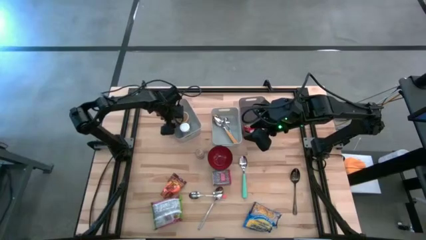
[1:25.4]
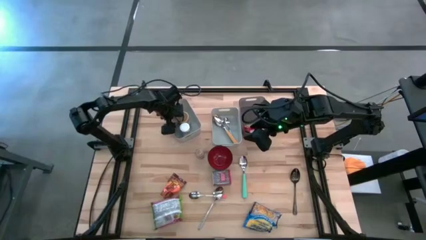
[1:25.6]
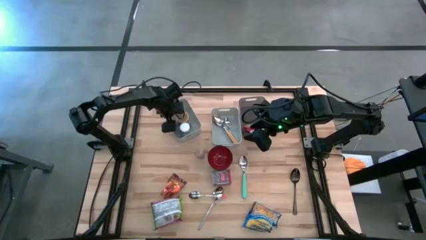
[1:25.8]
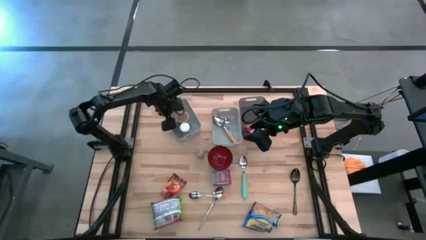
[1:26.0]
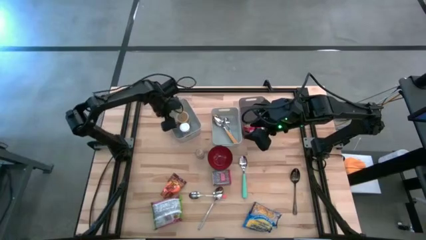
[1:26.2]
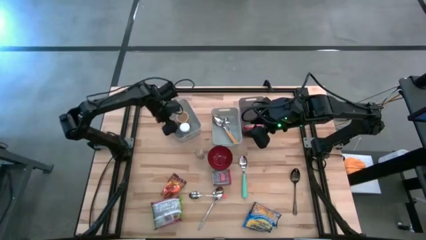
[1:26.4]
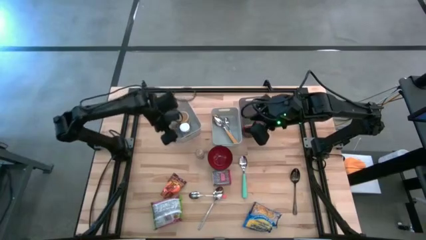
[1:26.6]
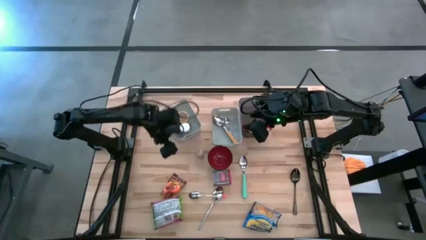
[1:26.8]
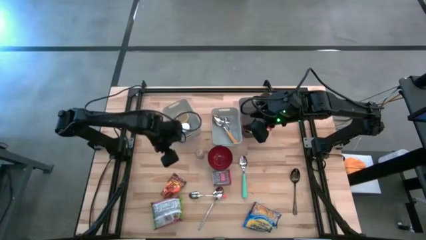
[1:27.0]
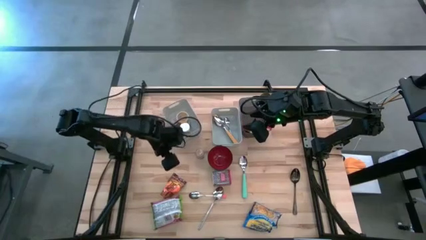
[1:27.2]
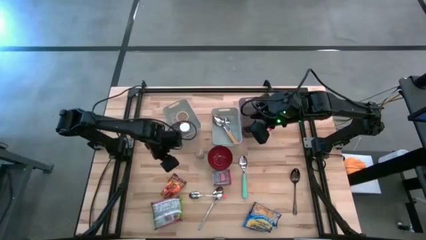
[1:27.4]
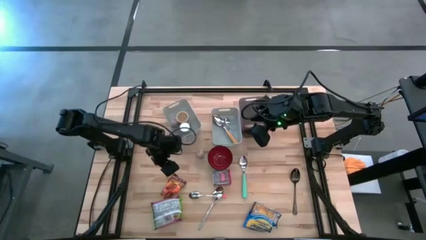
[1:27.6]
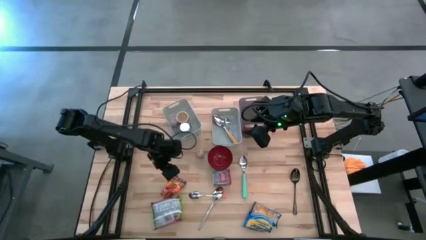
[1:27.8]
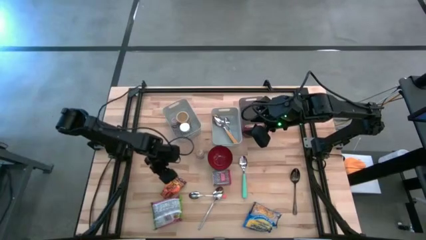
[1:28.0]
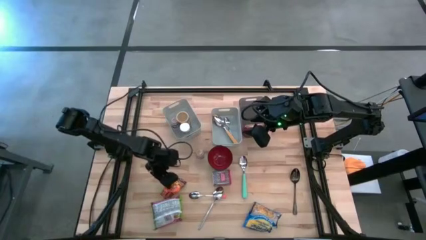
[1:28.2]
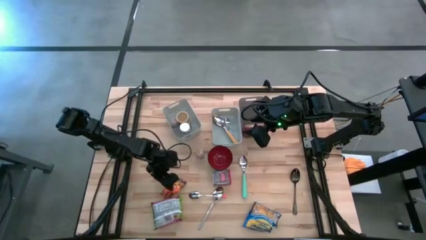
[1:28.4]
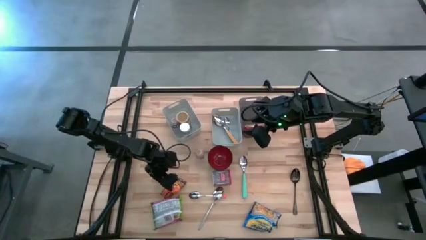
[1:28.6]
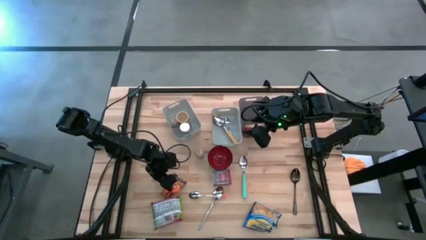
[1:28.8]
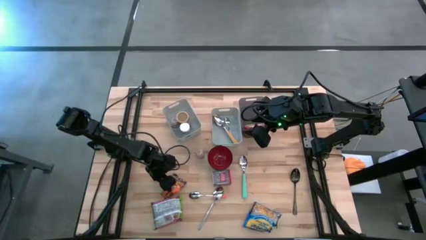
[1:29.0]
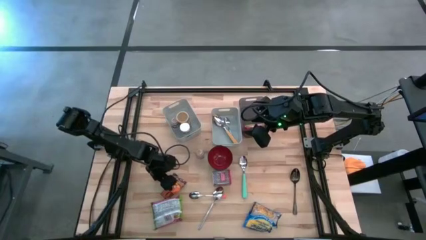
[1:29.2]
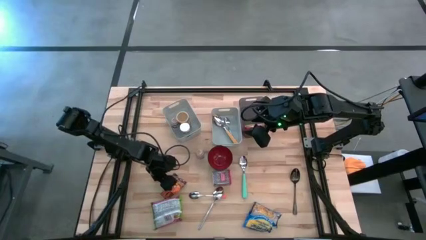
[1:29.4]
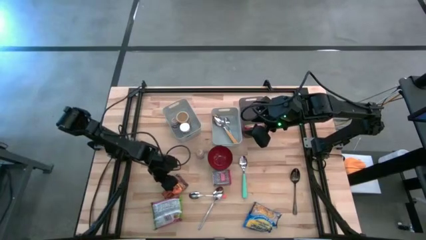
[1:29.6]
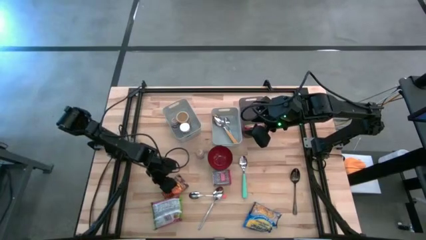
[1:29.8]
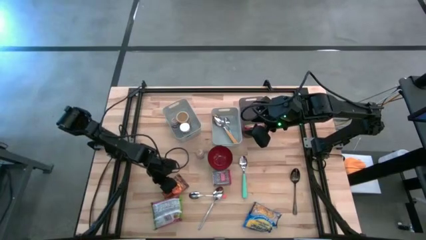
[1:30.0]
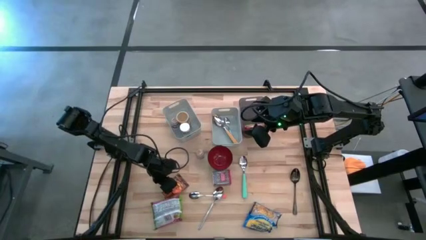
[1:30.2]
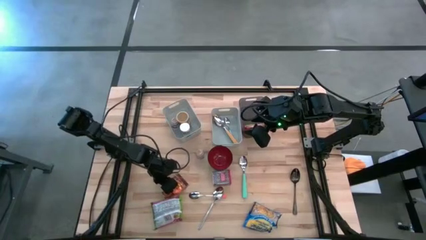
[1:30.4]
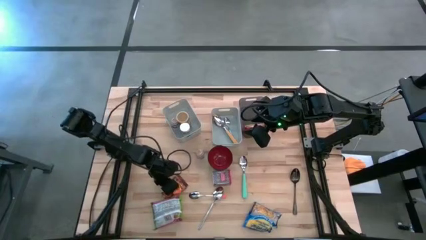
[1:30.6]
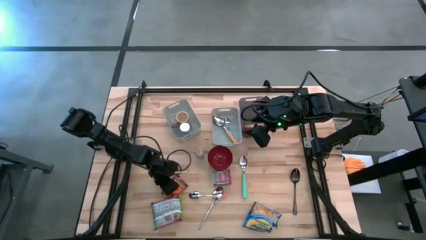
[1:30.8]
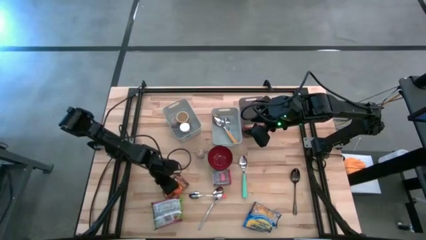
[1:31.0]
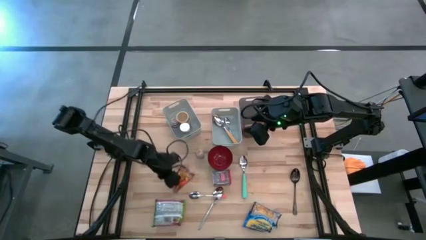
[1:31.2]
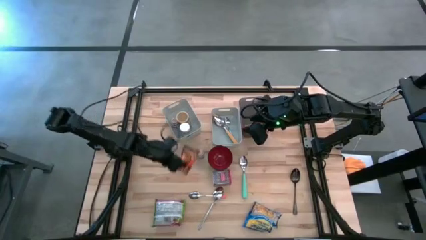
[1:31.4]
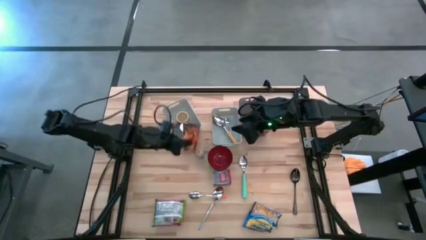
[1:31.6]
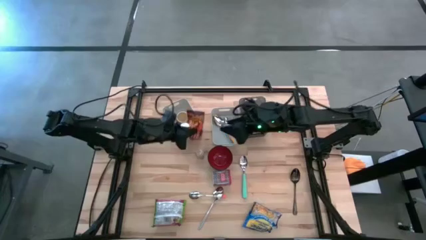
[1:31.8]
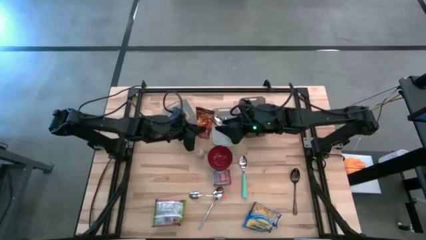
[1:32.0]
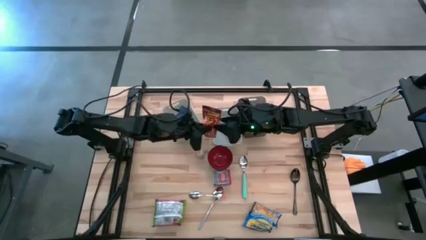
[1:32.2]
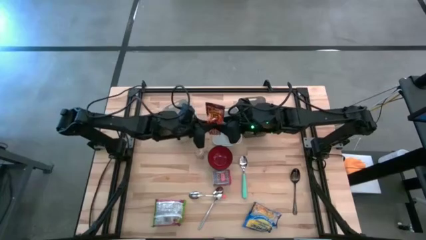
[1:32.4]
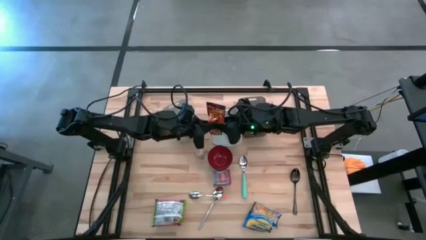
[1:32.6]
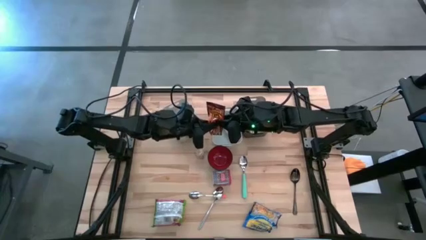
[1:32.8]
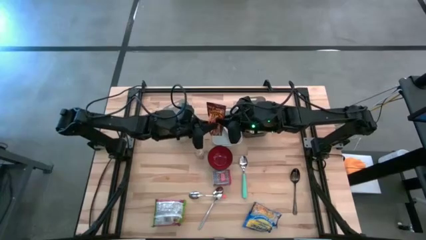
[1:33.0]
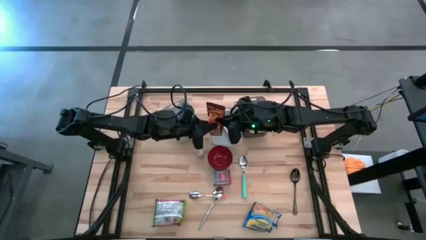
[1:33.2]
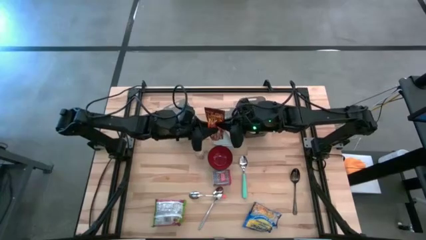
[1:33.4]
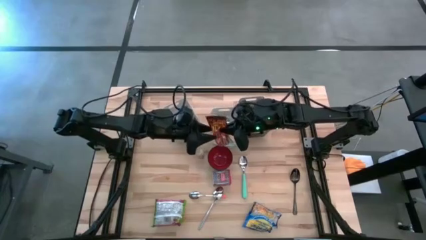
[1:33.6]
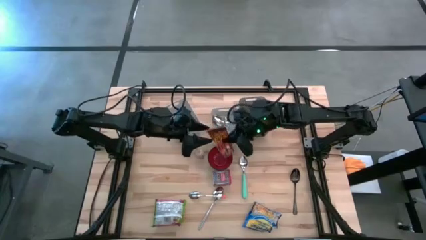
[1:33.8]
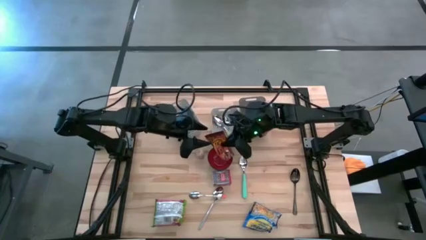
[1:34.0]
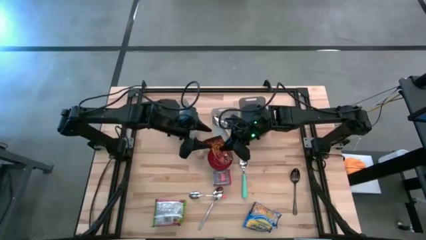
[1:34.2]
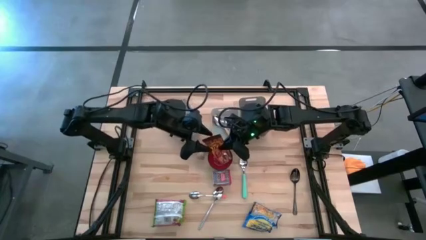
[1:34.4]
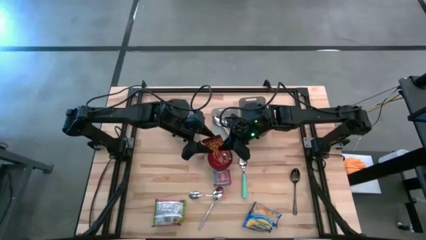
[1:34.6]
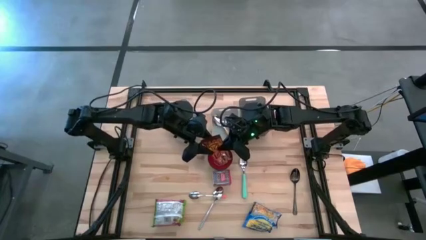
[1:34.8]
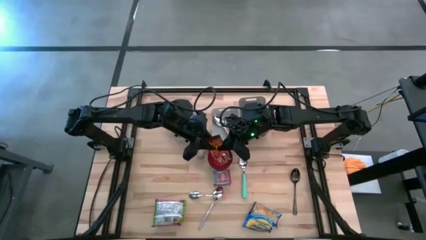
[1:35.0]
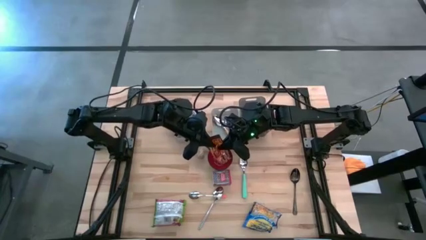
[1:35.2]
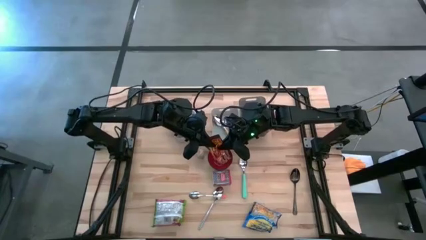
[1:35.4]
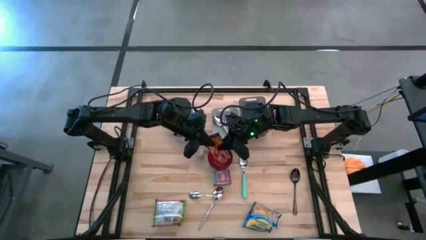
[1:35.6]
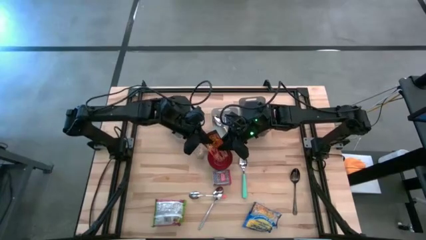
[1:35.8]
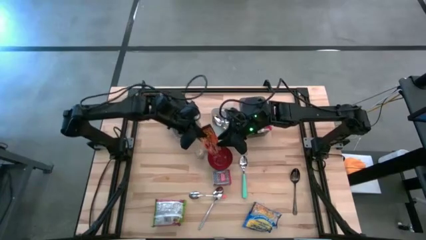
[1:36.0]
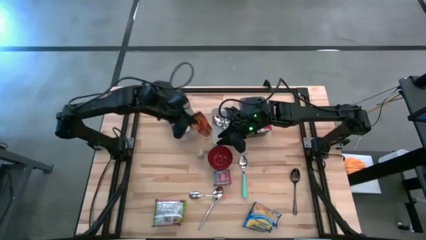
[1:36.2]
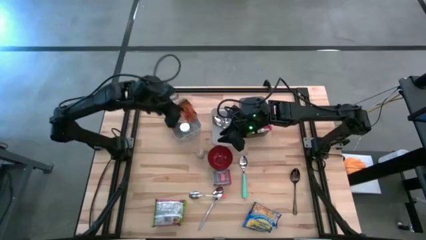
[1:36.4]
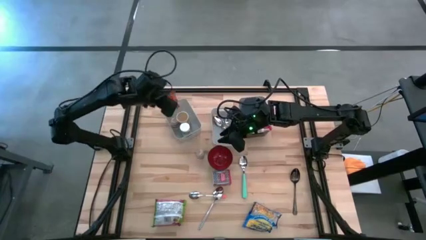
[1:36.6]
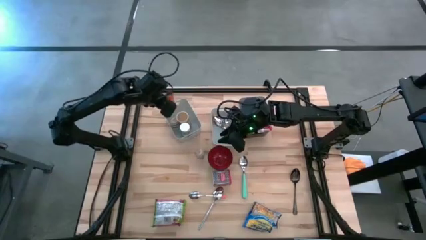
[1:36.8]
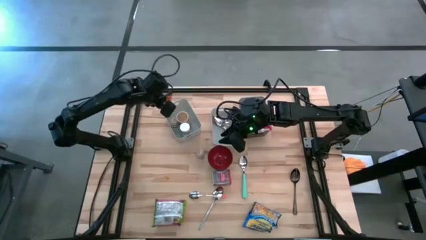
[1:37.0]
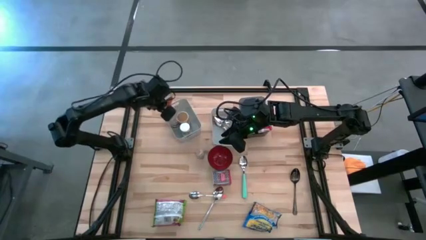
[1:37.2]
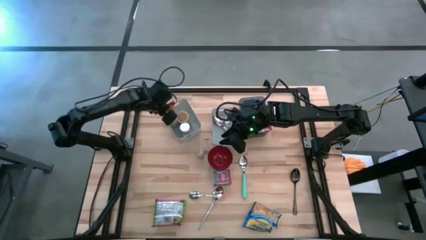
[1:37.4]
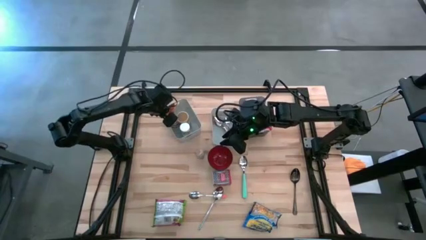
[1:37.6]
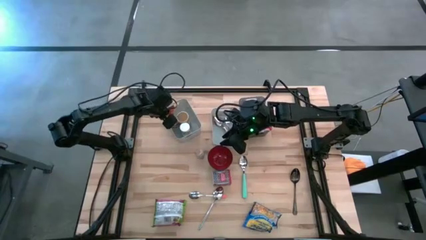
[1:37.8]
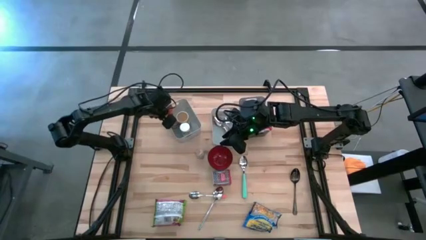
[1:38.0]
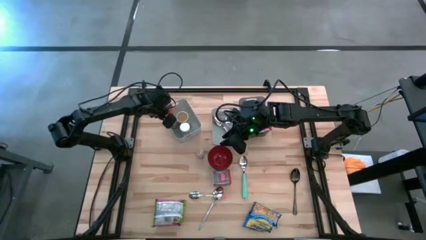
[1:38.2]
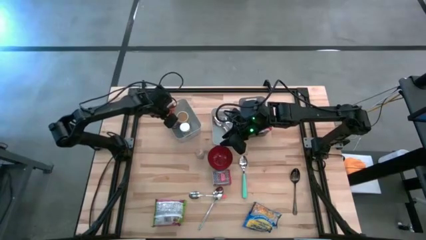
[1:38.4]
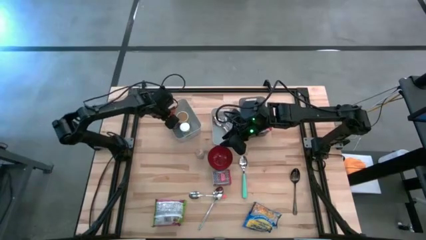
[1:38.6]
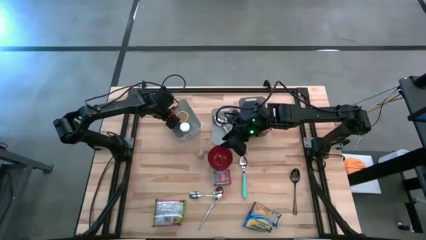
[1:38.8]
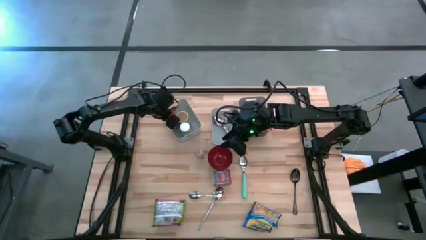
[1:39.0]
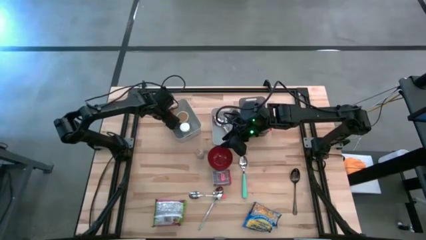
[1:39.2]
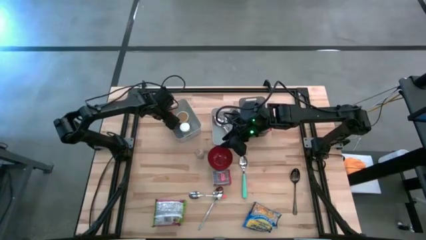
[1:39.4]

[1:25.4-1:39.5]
Put the orange seasoning pack into the left white bin

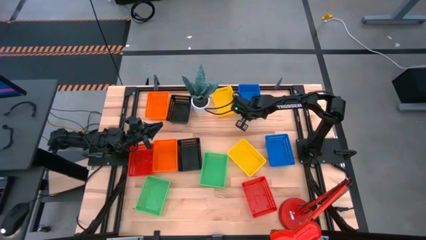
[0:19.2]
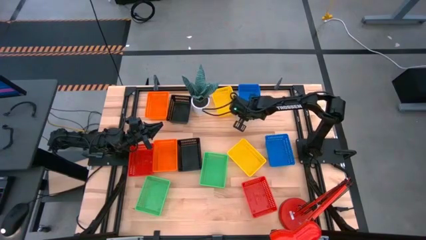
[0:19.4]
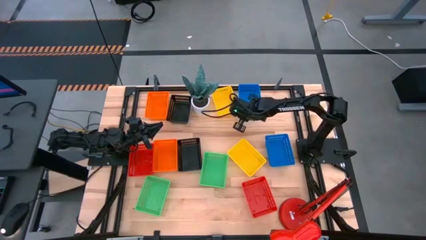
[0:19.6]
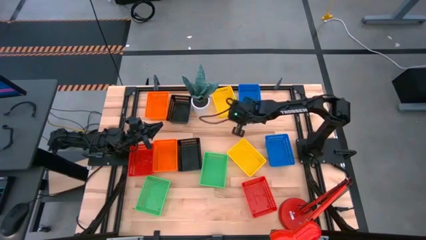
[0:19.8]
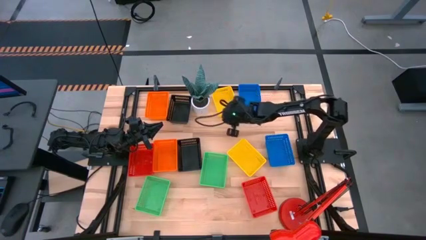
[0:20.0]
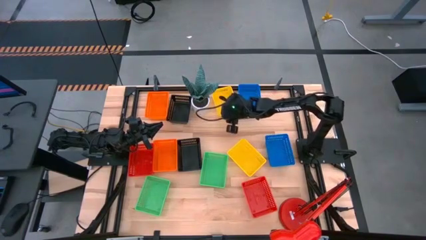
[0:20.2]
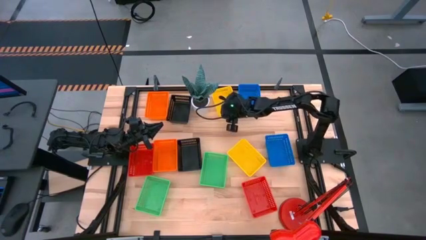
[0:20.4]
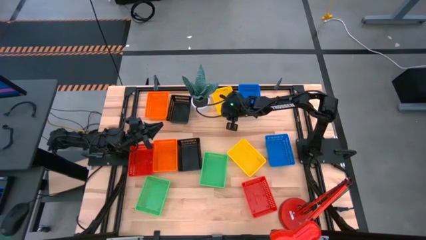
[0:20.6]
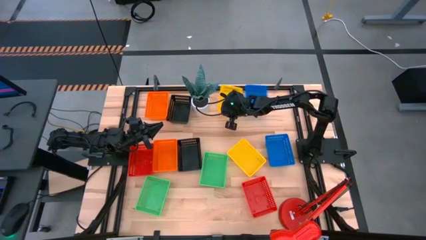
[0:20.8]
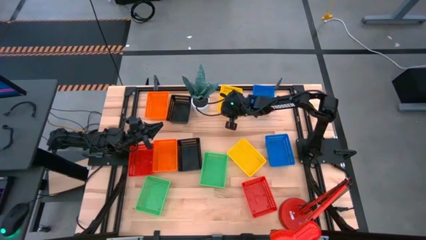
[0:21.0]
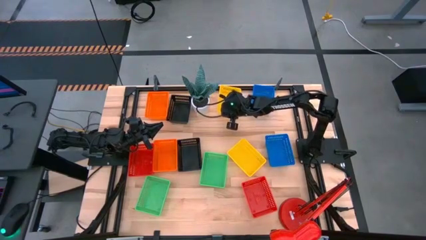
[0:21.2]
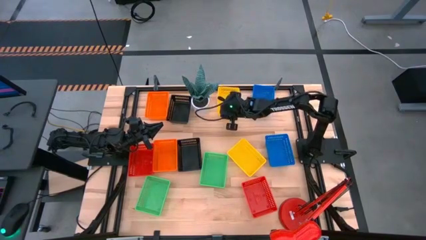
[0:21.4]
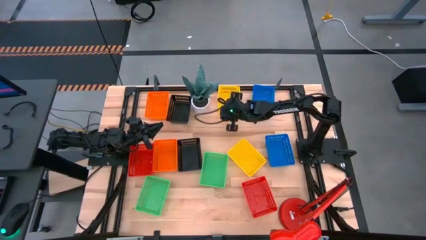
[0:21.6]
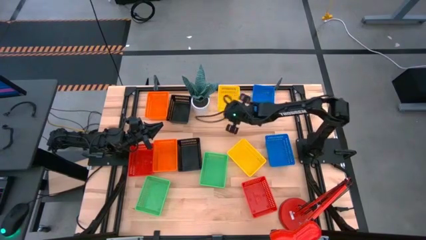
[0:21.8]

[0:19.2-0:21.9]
Adjust the top yellow bin
